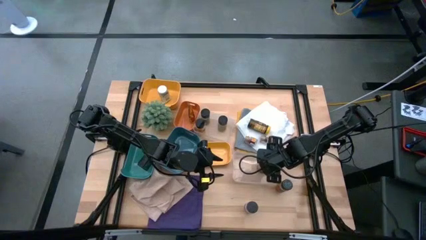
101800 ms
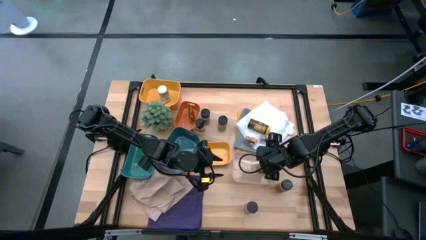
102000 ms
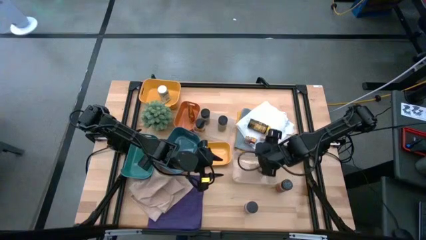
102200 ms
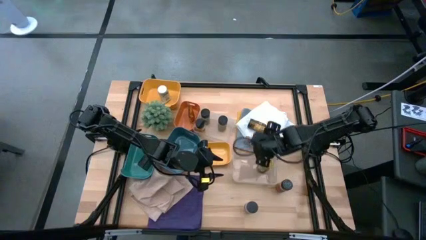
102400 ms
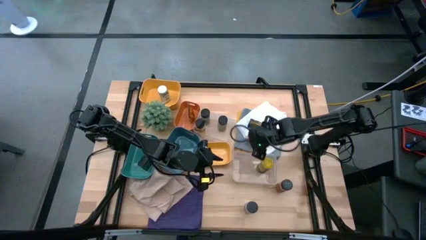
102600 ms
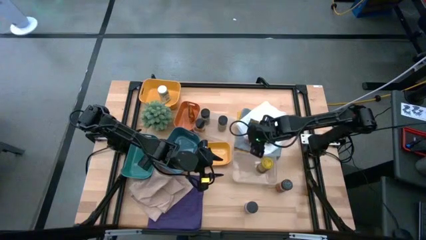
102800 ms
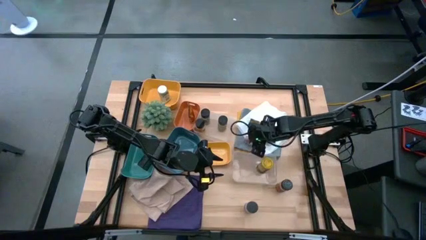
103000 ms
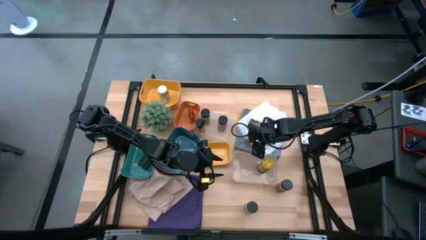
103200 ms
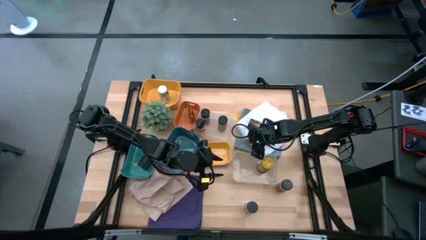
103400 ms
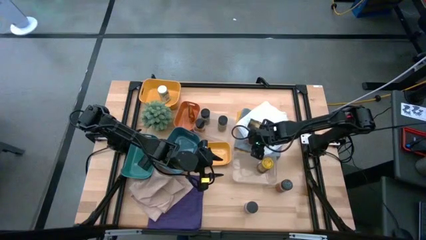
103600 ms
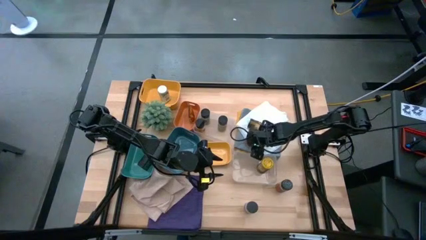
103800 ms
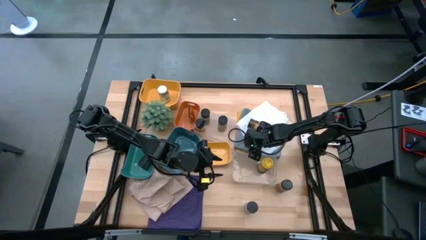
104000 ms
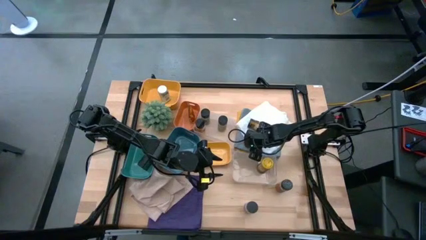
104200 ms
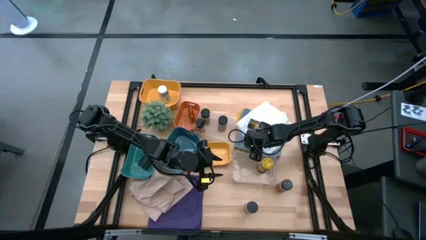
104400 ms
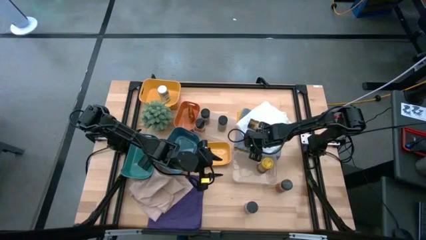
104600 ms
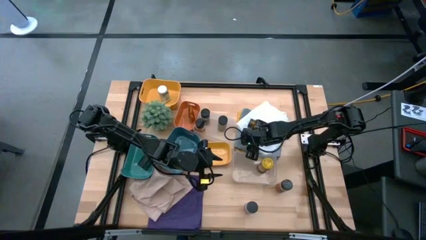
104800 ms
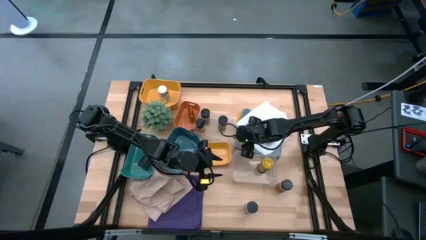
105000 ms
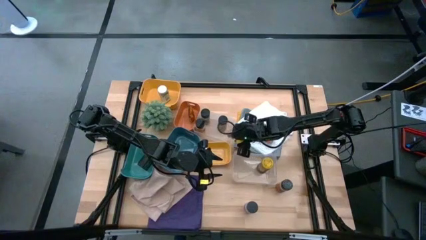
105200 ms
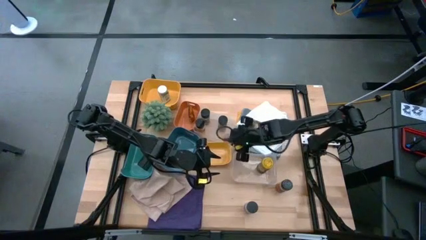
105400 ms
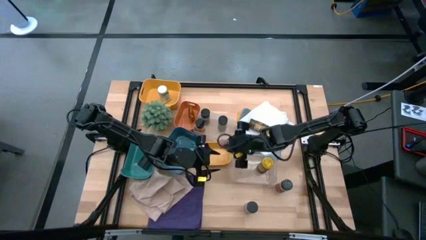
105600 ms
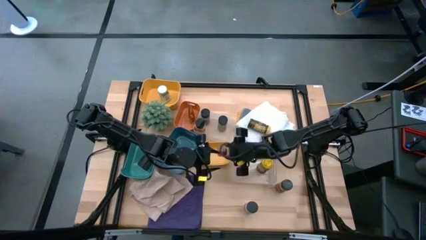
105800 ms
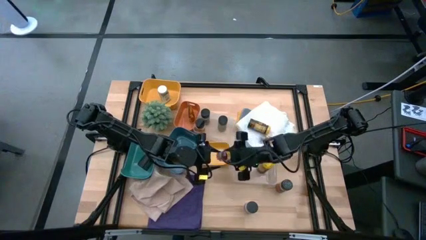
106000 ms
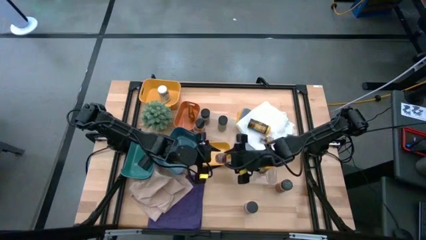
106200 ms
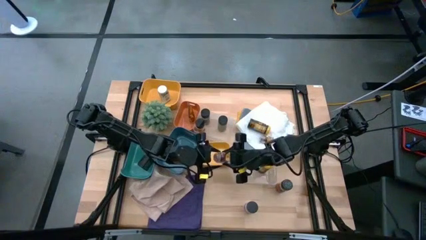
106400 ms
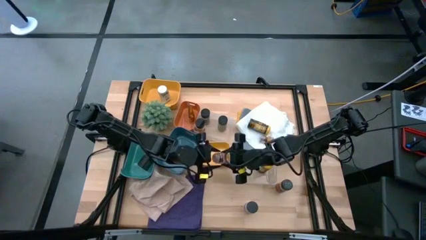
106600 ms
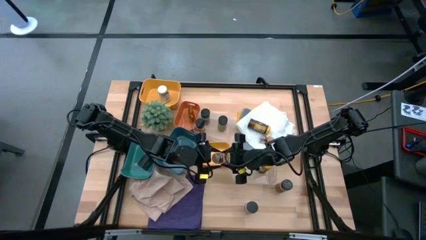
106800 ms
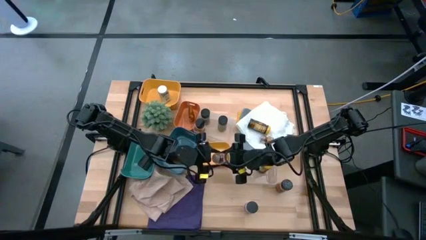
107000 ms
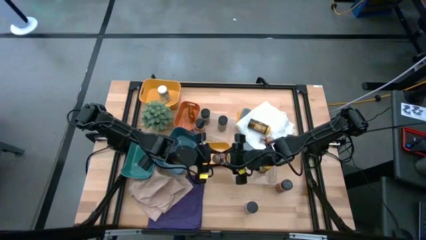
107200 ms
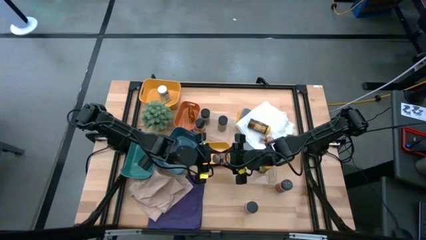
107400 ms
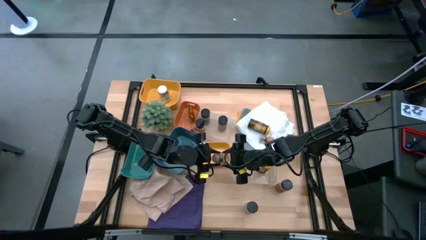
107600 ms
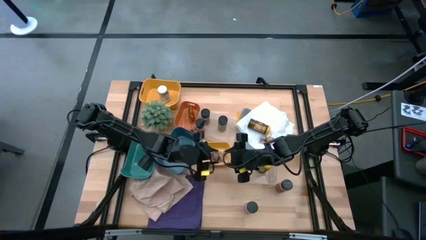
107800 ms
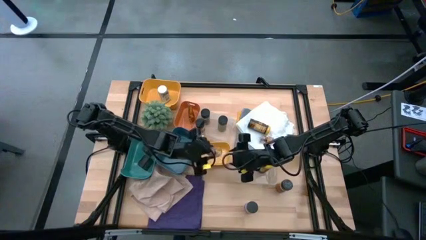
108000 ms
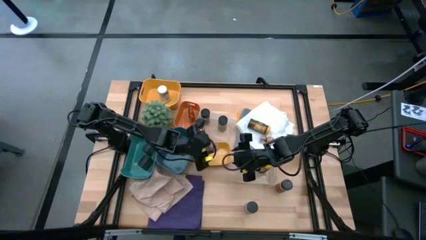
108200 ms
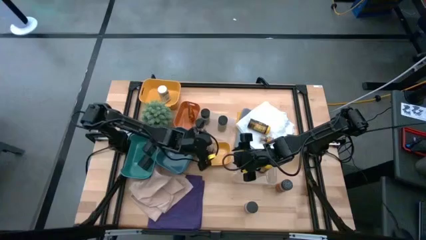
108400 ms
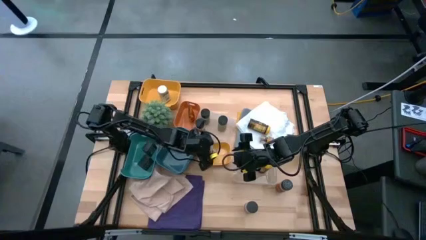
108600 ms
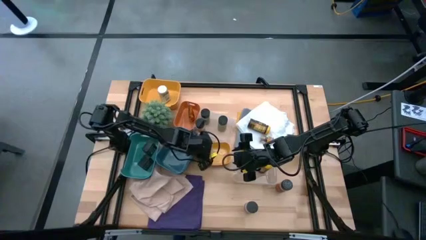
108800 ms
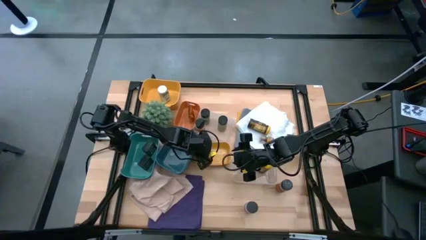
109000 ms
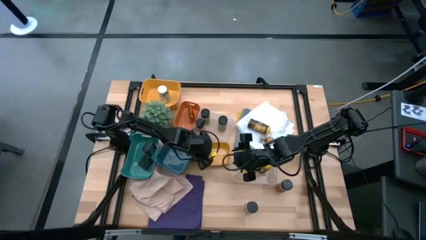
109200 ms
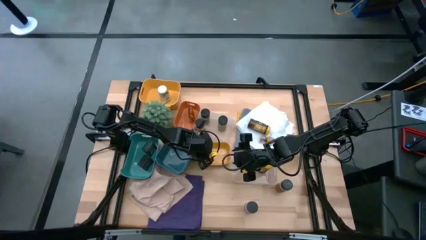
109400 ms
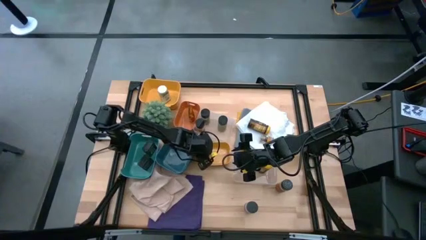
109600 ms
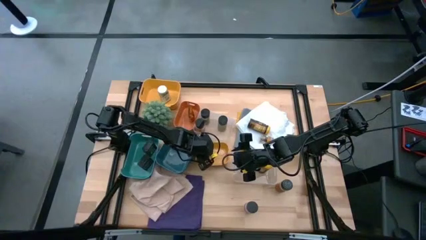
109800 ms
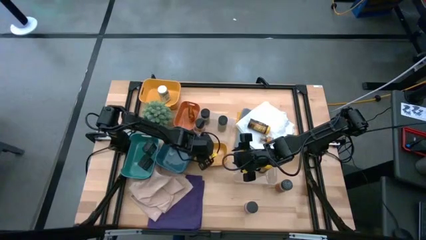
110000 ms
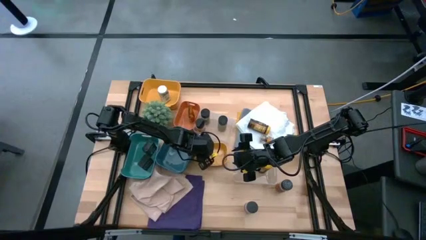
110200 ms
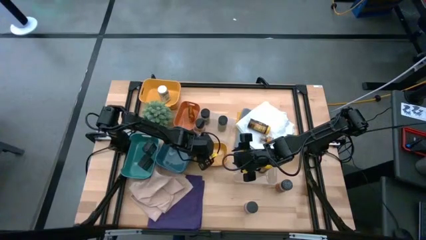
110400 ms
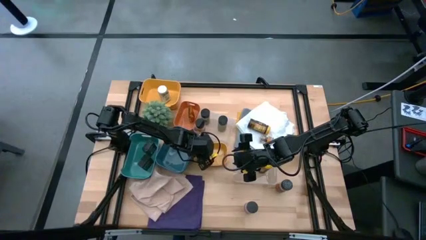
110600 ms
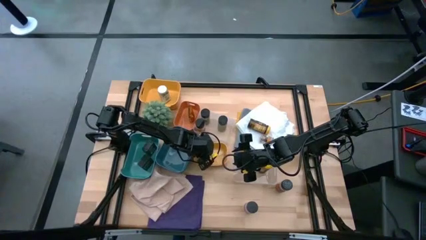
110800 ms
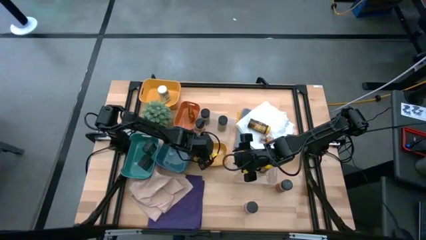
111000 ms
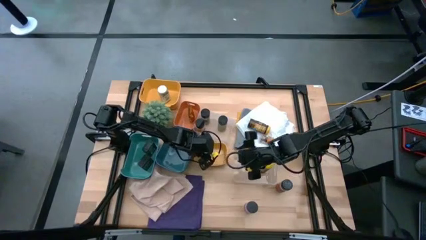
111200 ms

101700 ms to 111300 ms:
Task: Sort spices by type
Put the left brown seasoning bottle into the bottom yellow bin

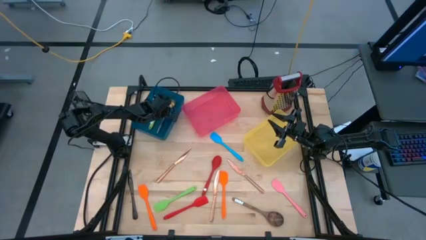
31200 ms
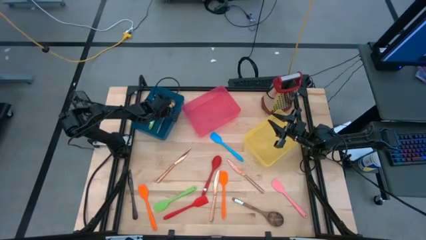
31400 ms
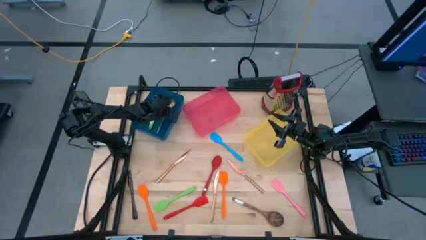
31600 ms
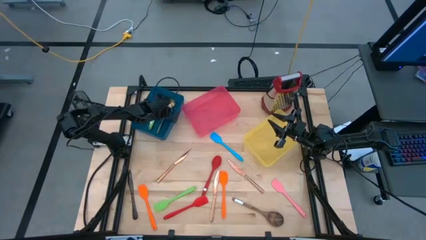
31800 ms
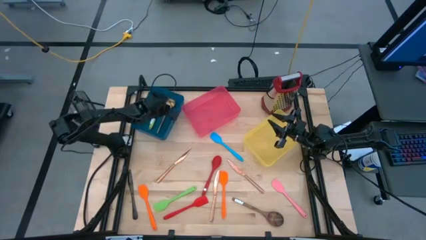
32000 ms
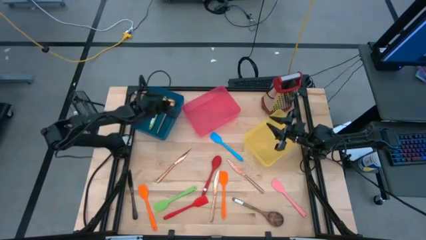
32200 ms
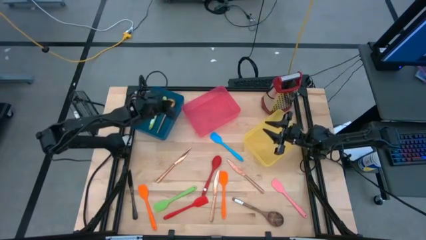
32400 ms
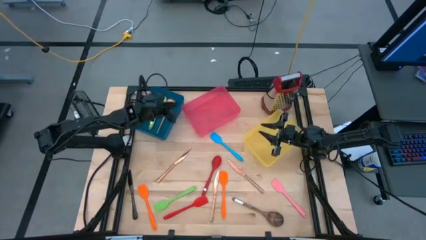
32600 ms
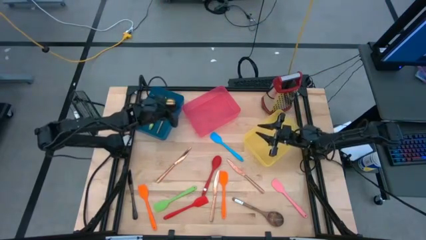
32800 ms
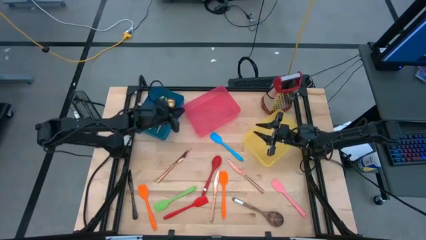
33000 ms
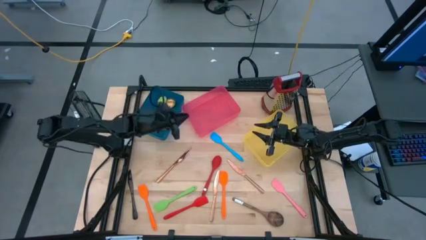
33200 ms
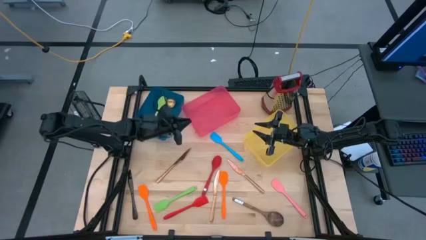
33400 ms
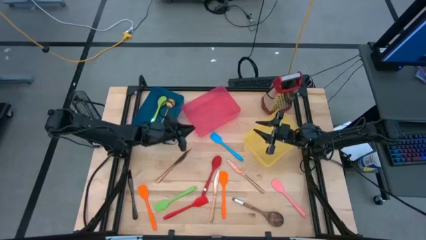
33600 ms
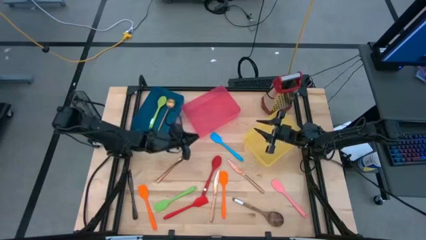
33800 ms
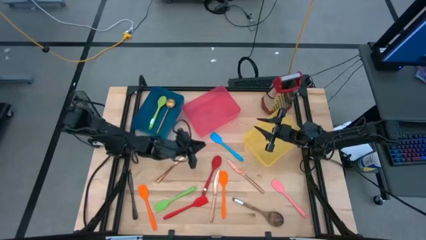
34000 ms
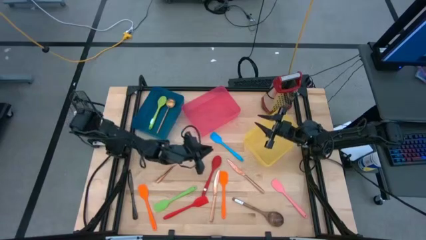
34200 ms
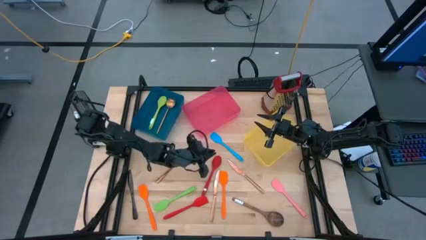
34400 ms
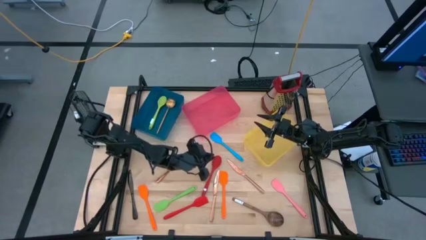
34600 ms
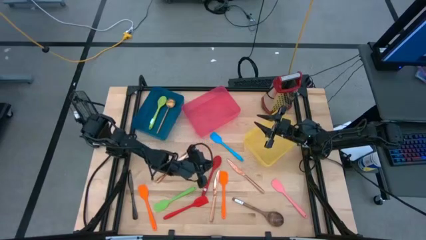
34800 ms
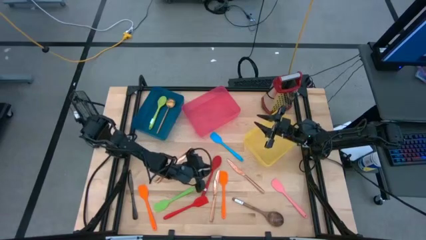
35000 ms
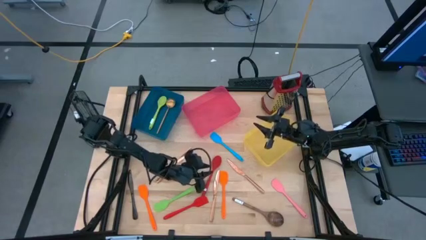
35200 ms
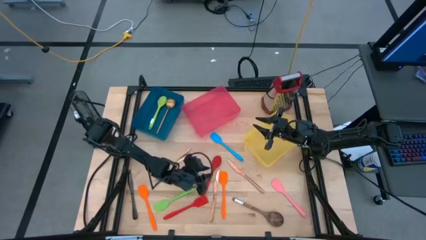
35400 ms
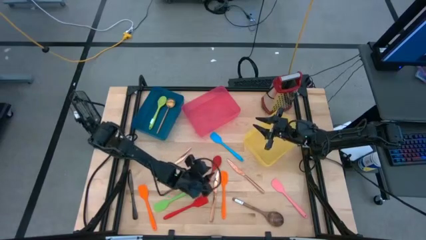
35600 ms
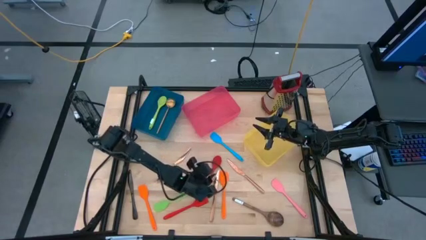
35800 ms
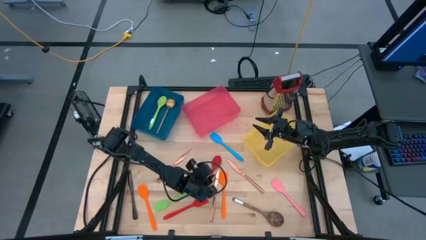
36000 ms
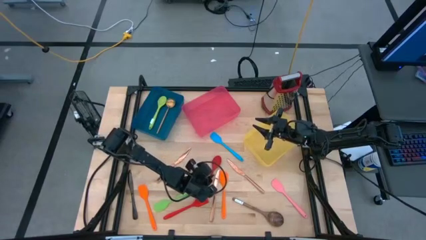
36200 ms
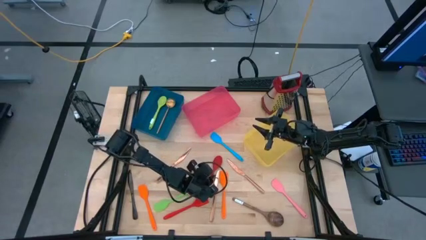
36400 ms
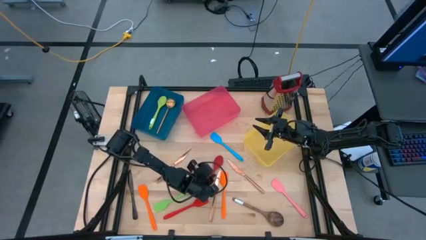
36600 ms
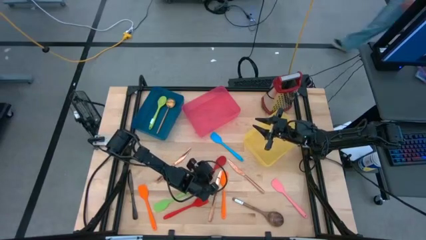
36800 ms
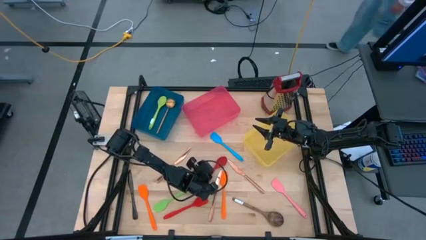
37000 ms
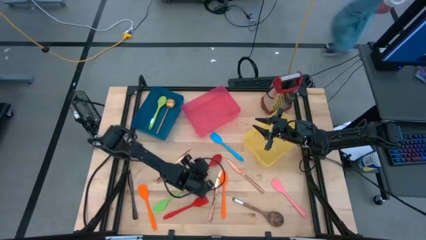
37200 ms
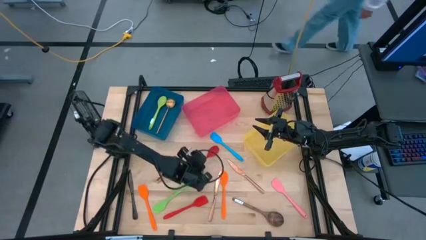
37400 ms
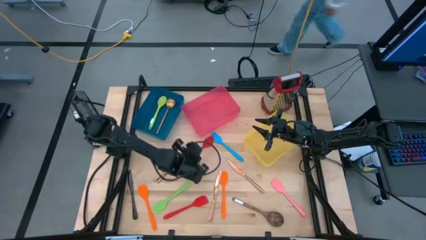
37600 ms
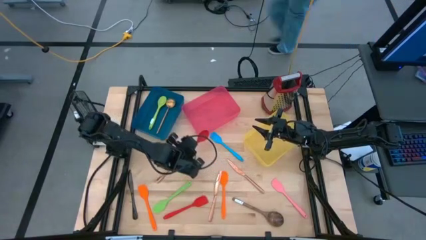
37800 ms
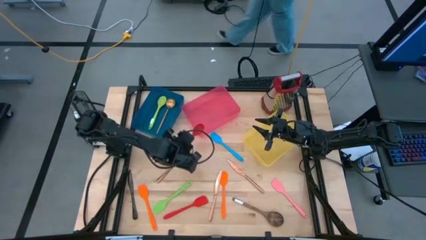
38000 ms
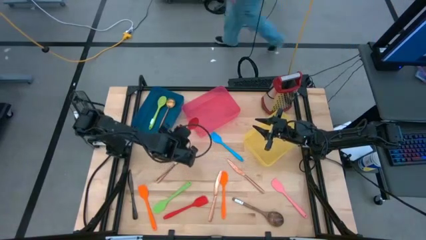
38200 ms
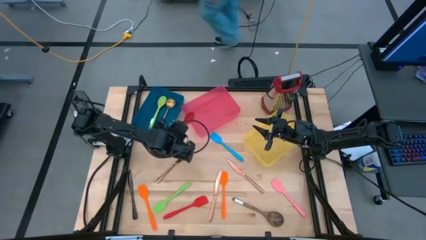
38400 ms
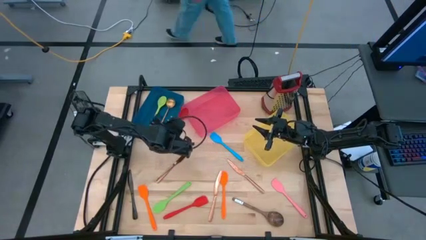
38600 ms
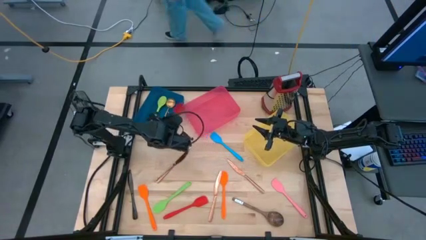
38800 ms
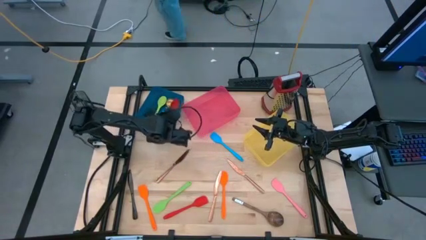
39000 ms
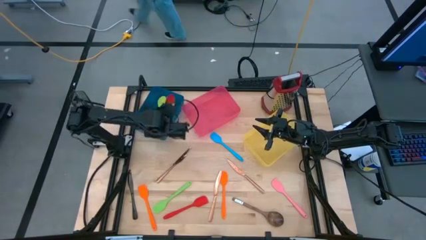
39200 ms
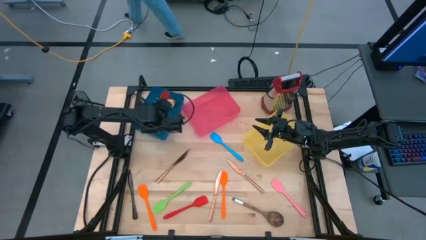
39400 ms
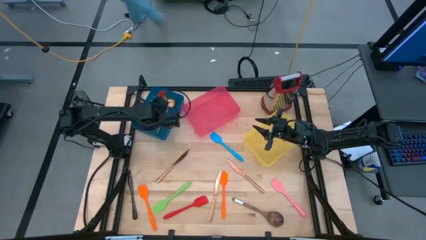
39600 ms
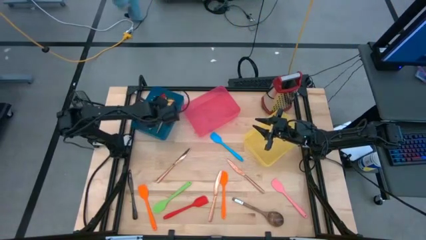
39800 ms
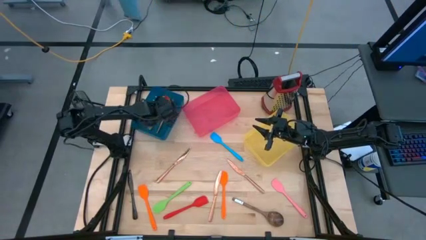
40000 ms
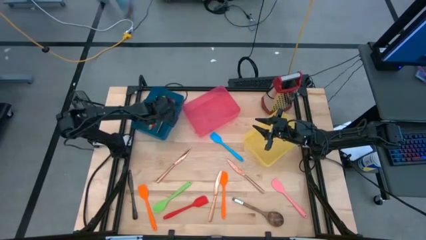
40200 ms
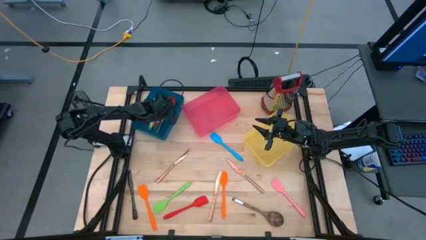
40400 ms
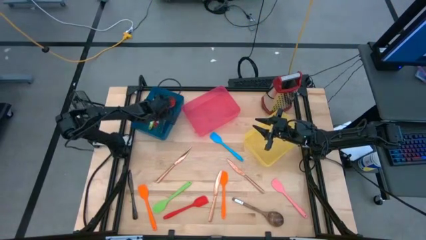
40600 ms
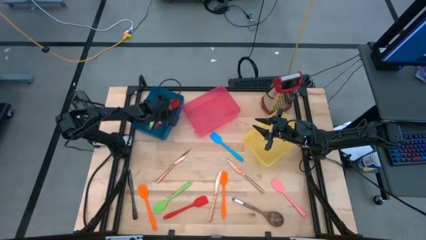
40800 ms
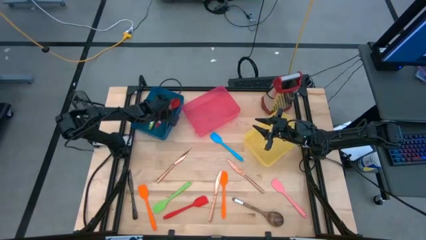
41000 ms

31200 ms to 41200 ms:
Task: Pick & Place Kitchen Items
Put the red spoon into the blue bin
